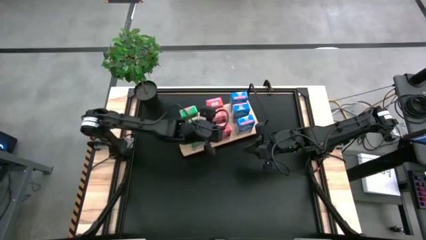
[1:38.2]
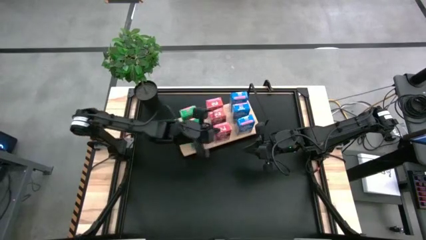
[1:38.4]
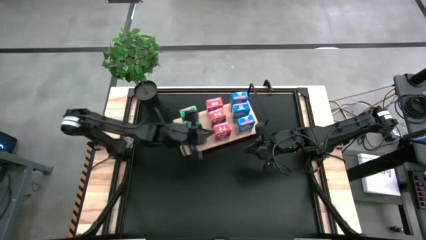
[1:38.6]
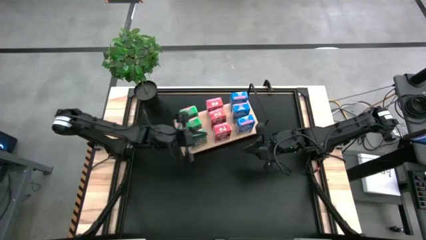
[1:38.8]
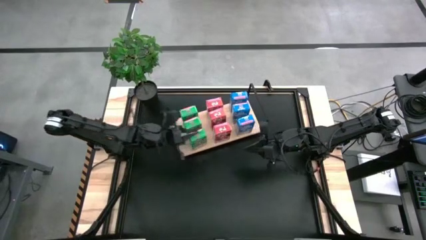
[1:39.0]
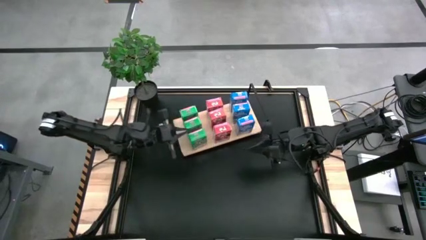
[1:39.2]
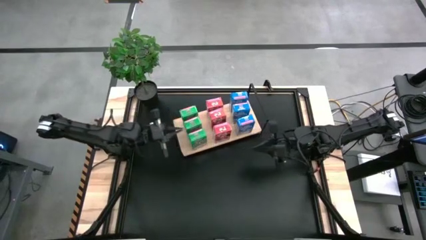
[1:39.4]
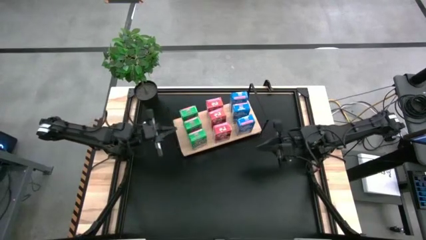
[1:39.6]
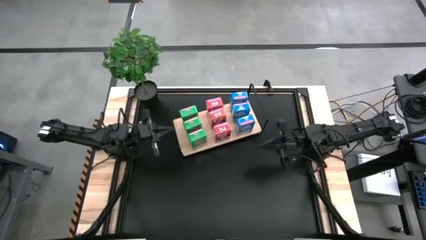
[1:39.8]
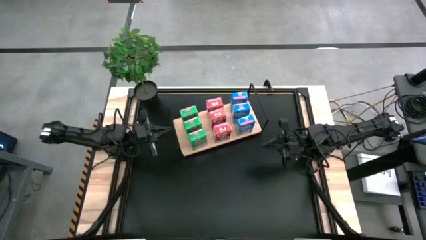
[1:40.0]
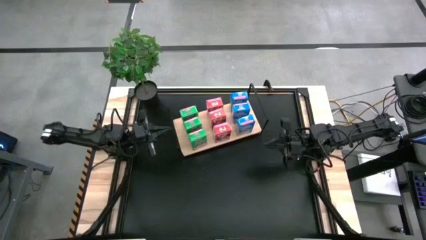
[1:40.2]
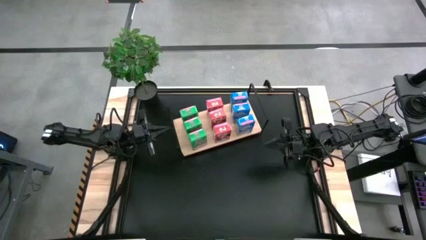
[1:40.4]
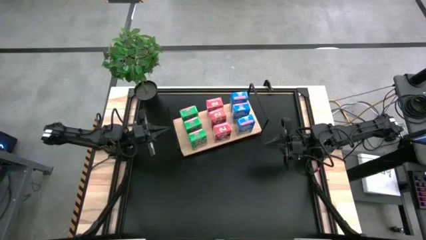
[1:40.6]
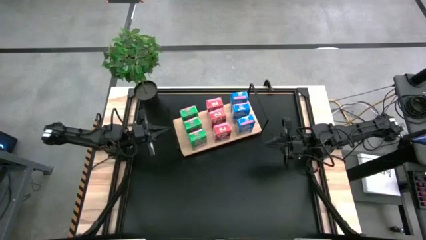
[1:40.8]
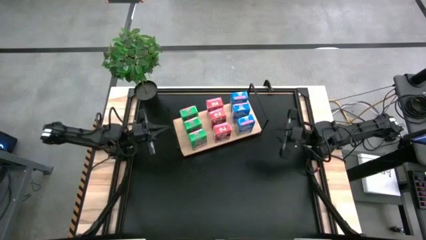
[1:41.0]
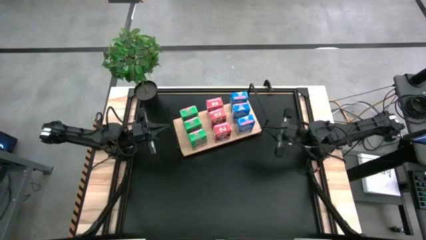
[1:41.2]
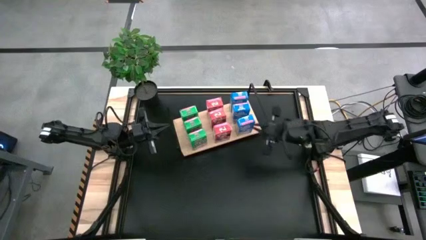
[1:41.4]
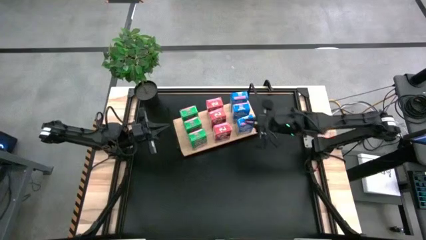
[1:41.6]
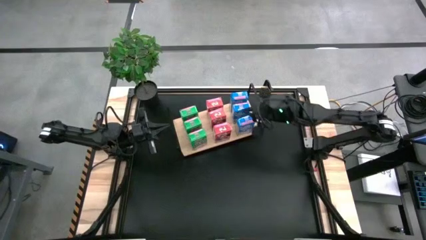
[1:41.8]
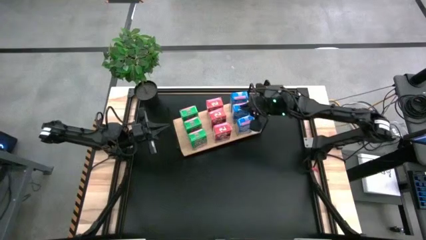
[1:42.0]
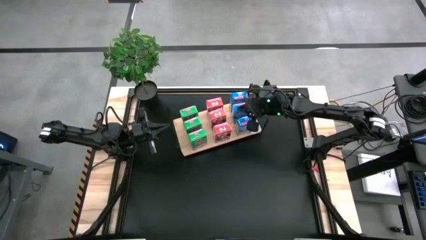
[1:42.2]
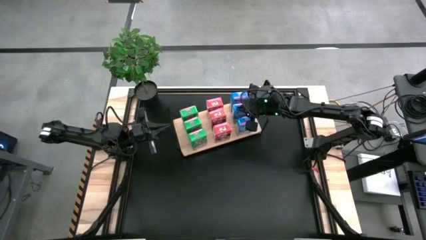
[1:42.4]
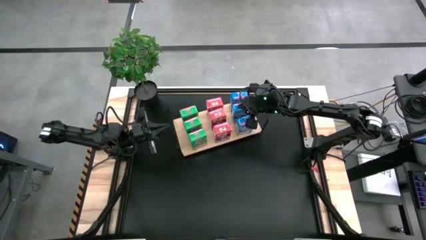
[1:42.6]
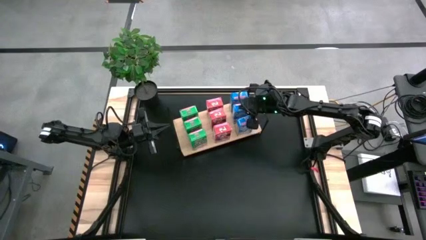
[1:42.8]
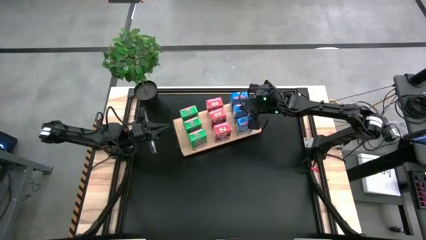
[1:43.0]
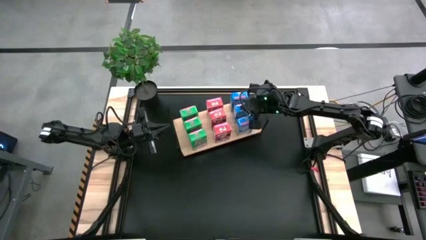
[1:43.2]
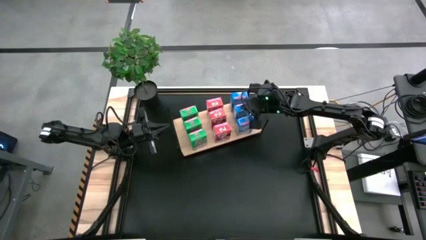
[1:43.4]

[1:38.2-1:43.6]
Task: Stack cereal on shelf
Adjust the blue cereal box

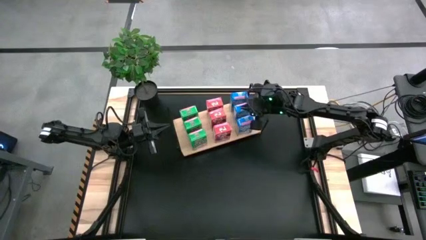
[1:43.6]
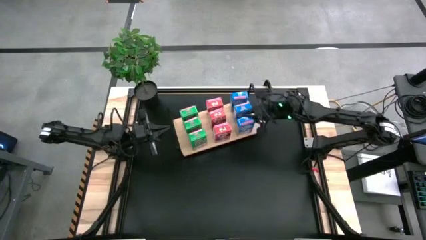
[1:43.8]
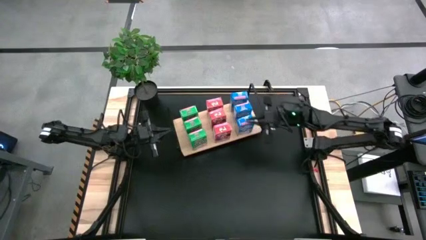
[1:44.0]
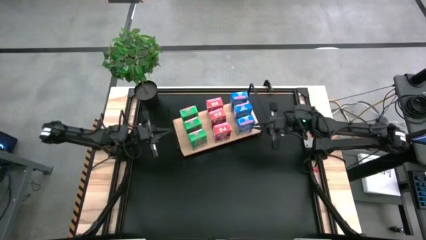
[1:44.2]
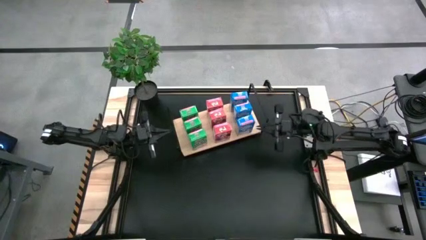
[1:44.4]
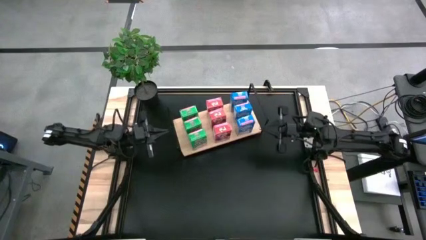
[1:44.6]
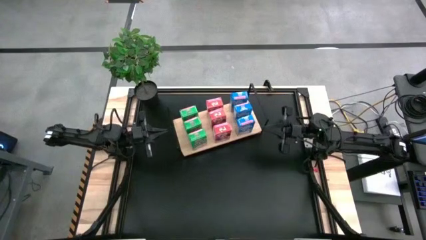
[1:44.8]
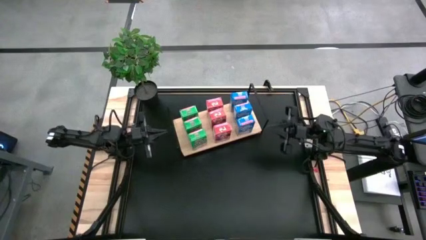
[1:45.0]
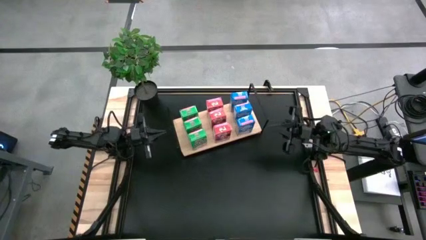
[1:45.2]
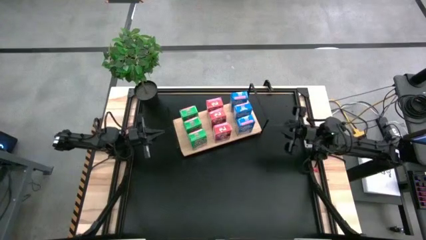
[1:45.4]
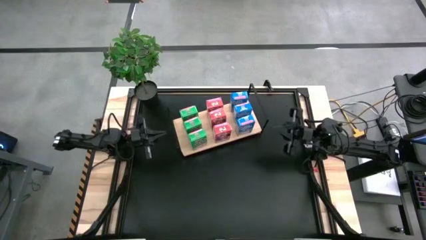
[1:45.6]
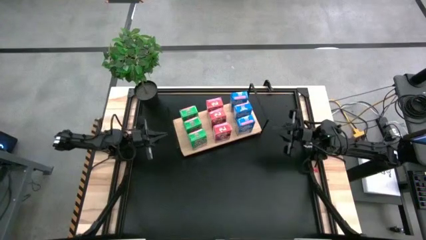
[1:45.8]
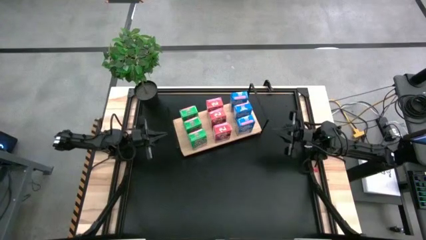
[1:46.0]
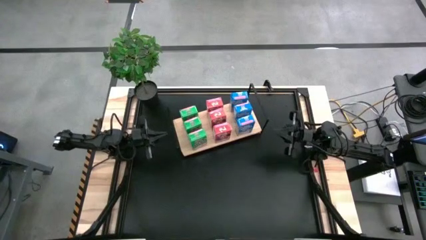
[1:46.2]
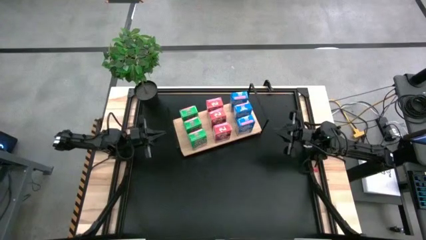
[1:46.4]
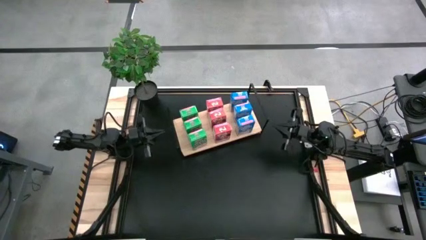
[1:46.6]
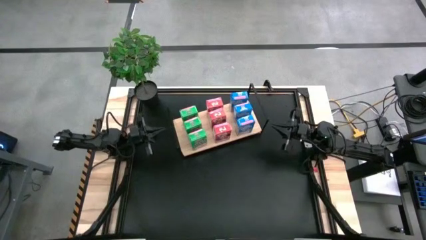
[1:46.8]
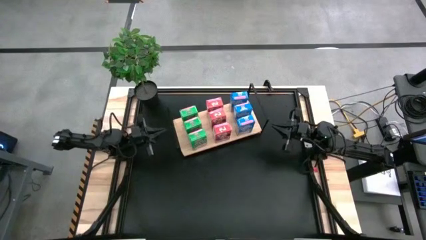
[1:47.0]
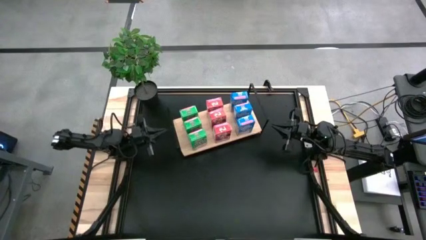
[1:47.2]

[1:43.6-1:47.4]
Return to Home Position

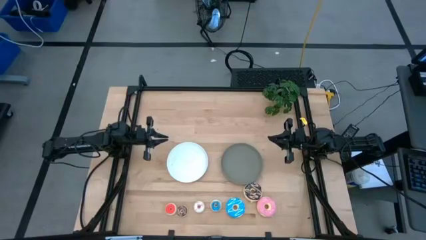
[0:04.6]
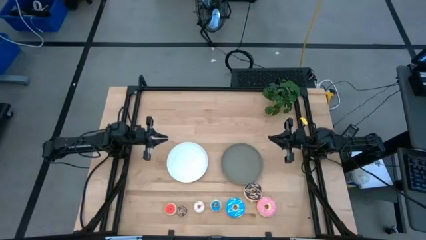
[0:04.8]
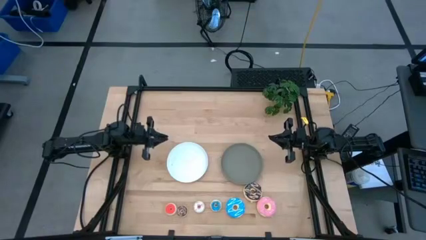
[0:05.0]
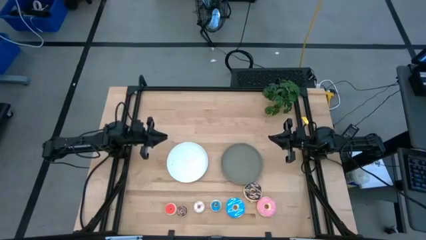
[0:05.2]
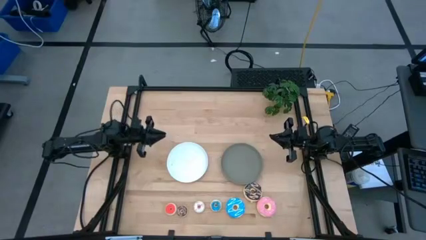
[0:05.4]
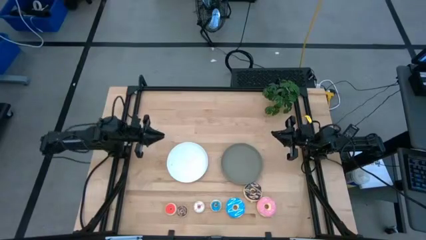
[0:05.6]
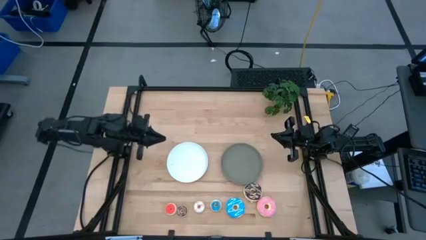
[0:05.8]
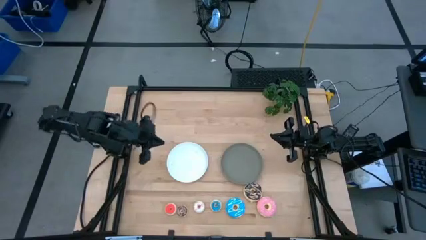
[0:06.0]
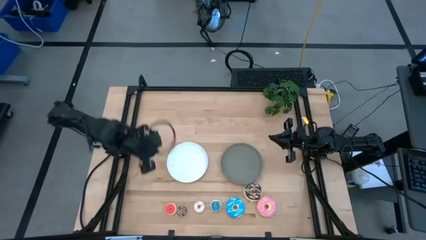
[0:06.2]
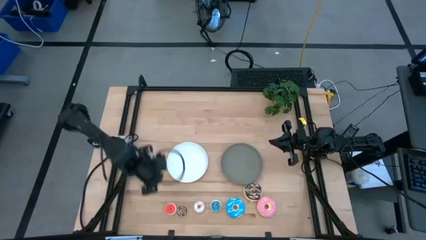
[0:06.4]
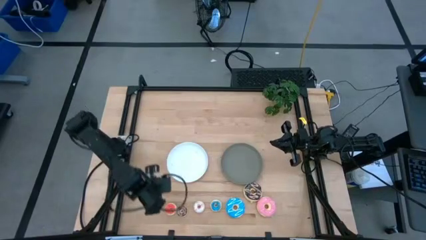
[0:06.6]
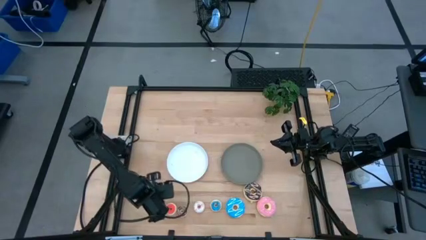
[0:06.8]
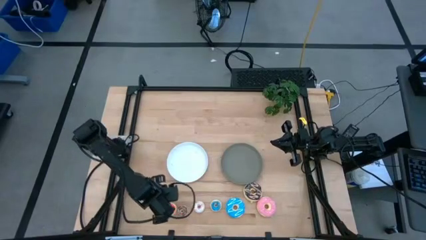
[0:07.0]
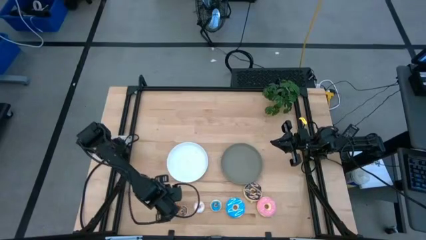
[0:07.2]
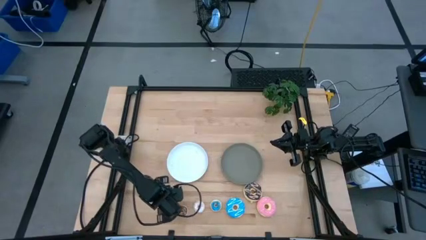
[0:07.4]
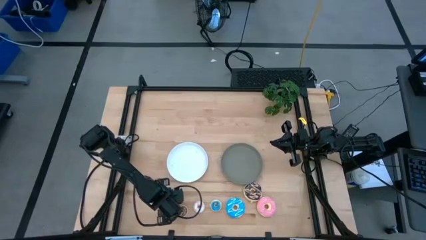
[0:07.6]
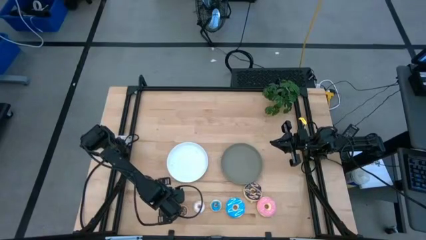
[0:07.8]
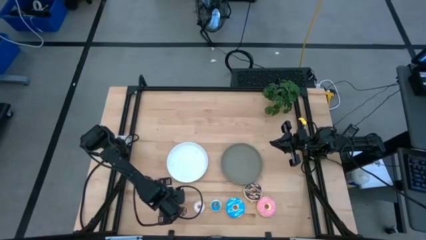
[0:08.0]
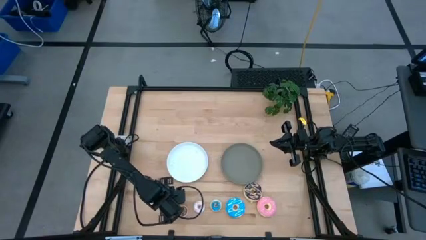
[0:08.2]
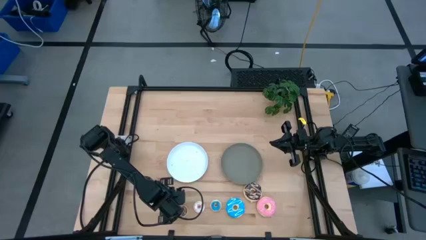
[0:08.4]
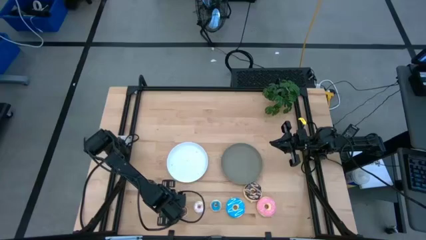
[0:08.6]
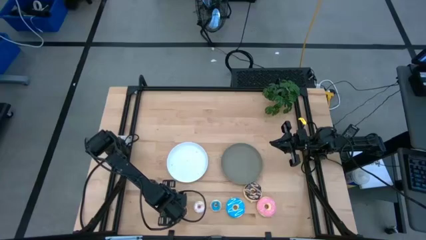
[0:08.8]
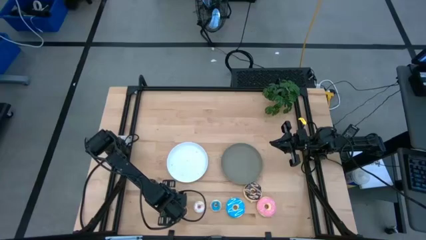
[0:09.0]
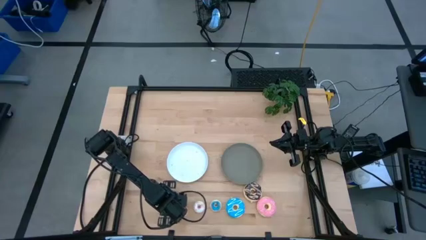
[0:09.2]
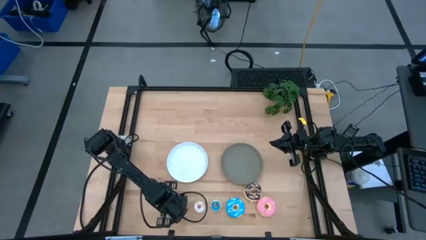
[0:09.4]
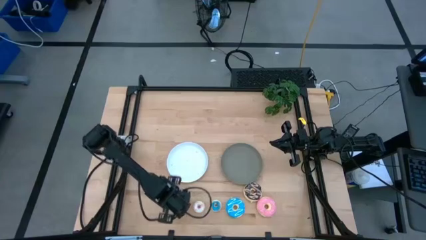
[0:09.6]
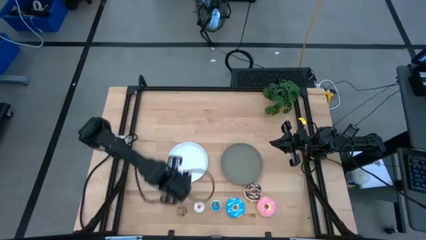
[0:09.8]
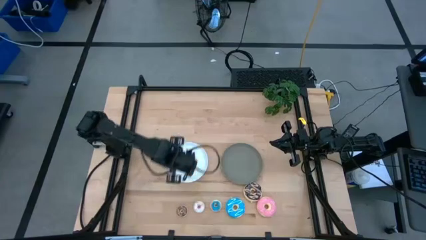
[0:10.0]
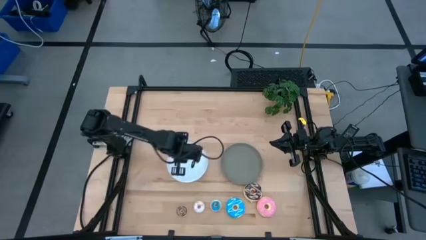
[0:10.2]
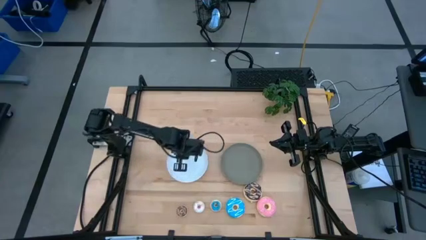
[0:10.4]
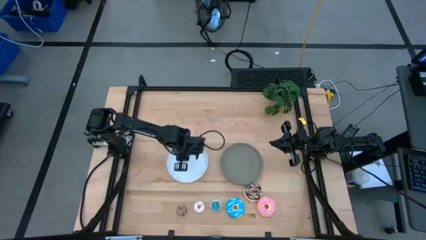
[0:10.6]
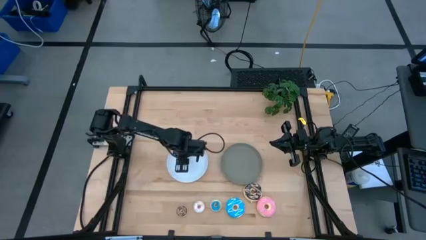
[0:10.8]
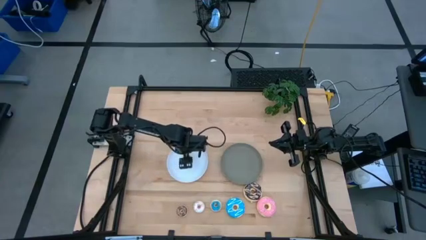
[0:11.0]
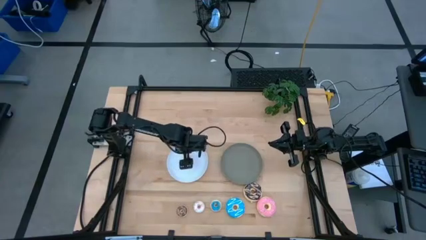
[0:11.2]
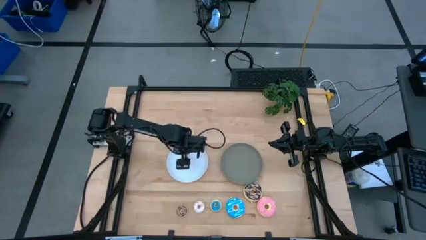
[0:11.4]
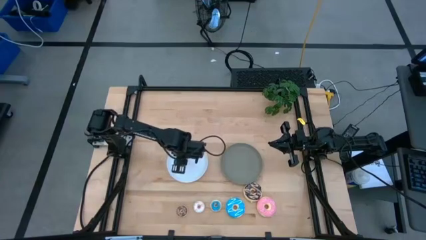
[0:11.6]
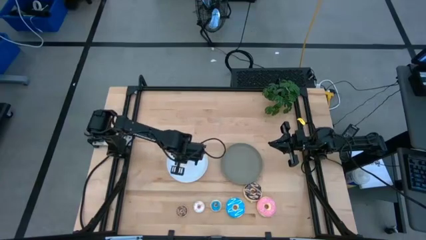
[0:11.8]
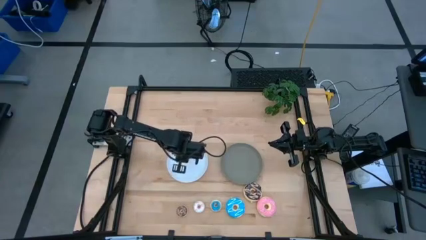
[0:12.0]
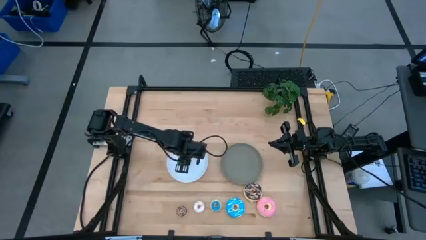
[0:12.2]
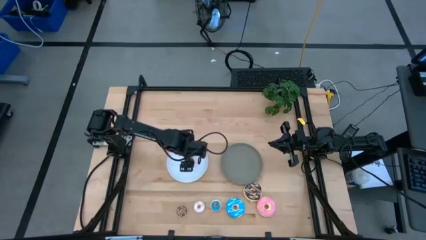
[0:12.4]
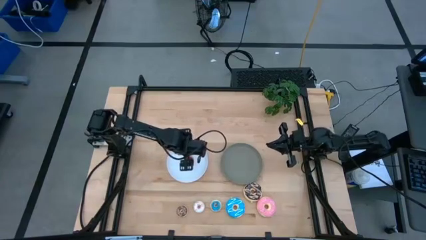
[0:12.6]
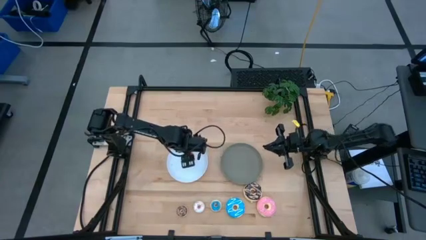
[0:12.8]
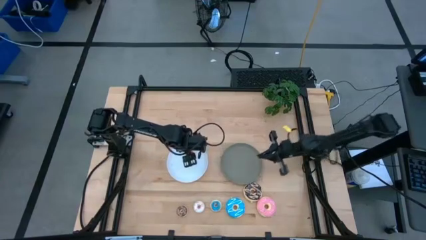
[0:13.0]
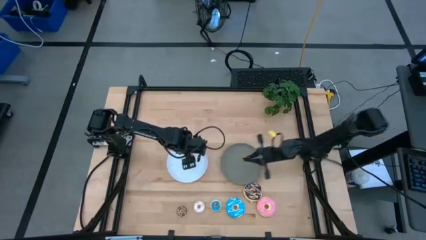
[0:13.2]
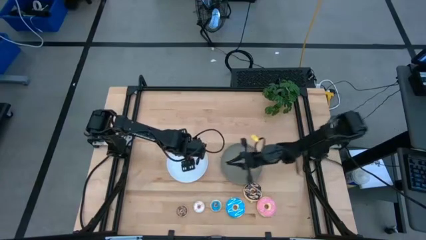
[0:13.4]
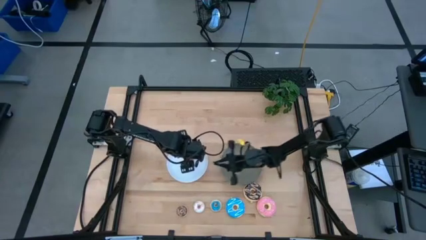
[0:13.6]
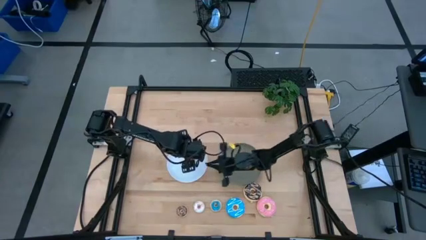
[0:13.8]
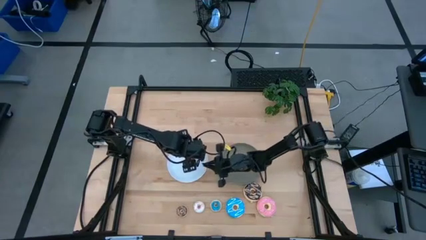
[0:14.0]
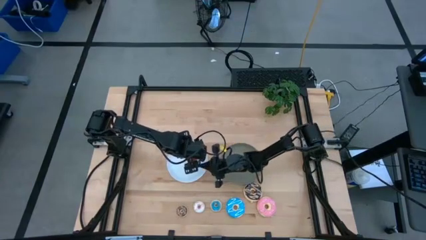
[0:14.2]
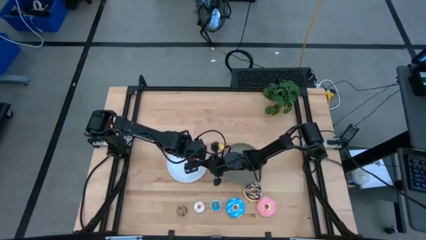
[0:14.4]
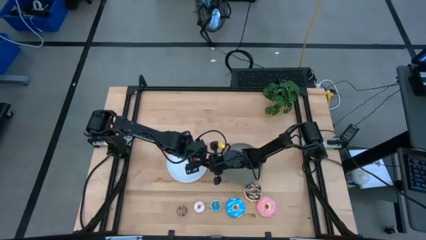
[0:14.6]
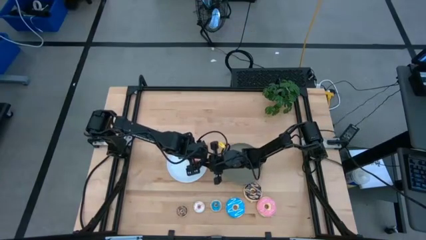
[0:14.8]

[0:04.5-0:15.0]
Task: Pick & Place donuts
Put the small red donut on the white plate
